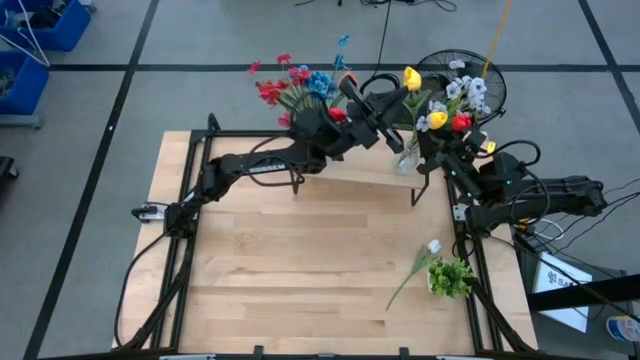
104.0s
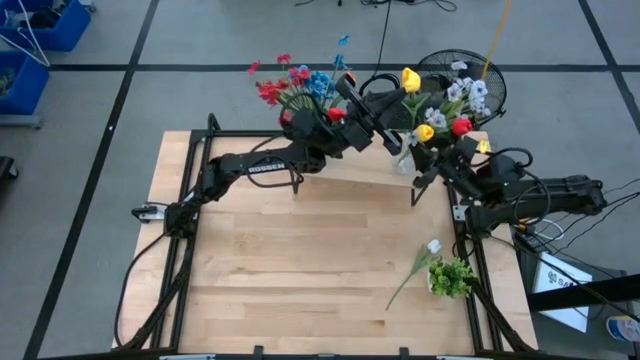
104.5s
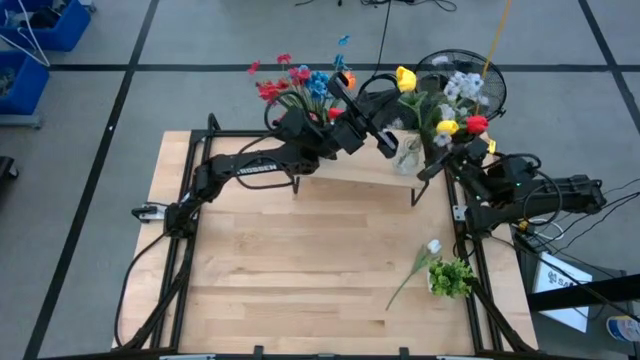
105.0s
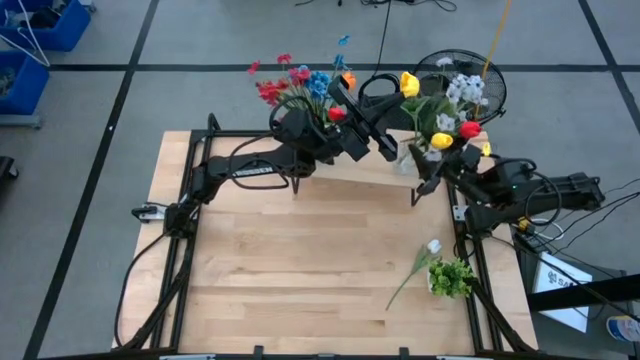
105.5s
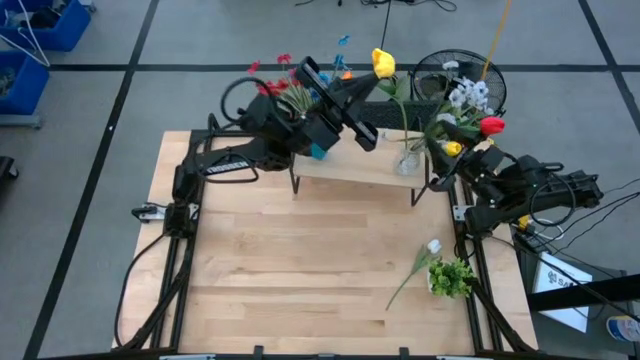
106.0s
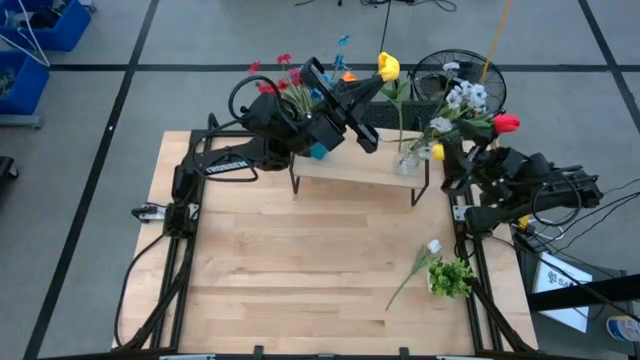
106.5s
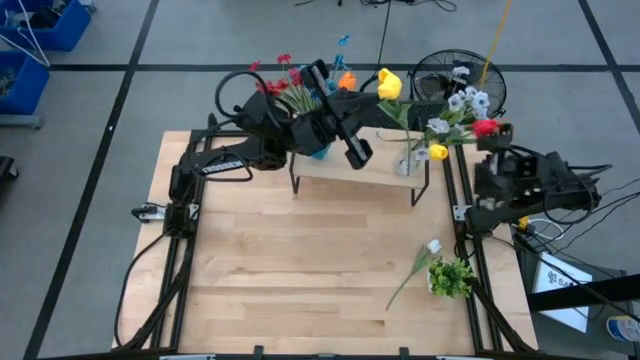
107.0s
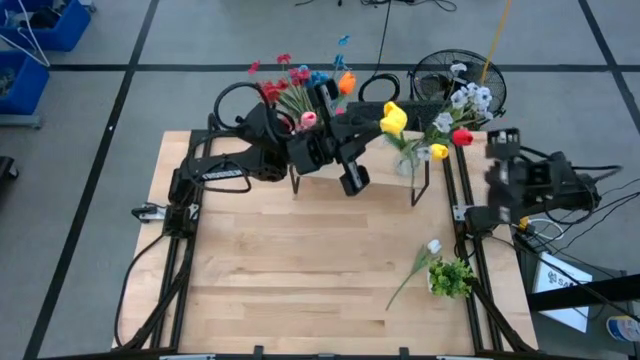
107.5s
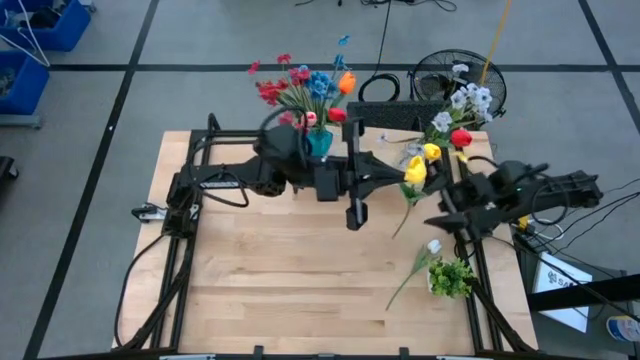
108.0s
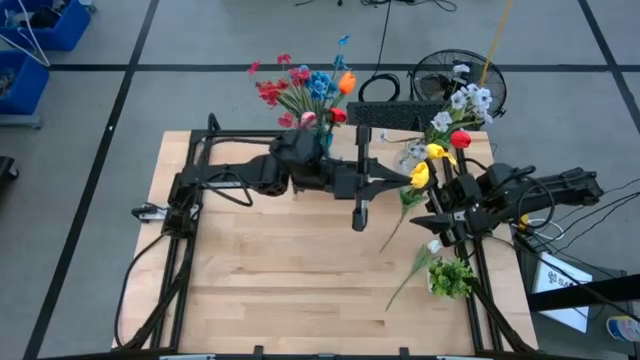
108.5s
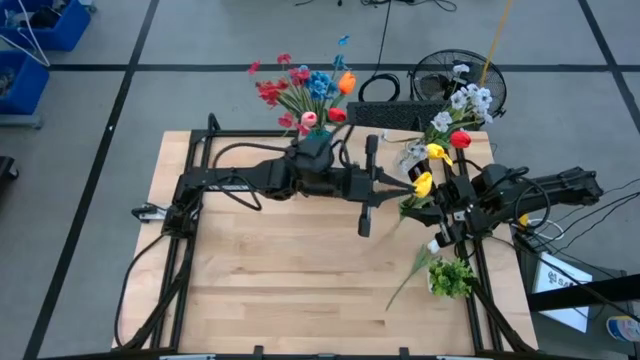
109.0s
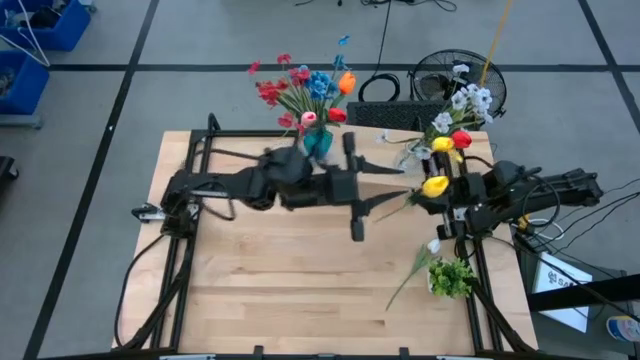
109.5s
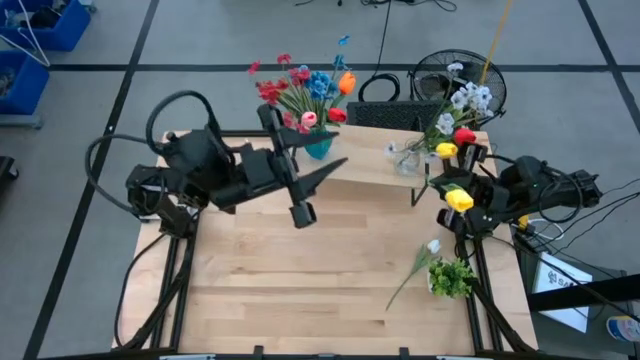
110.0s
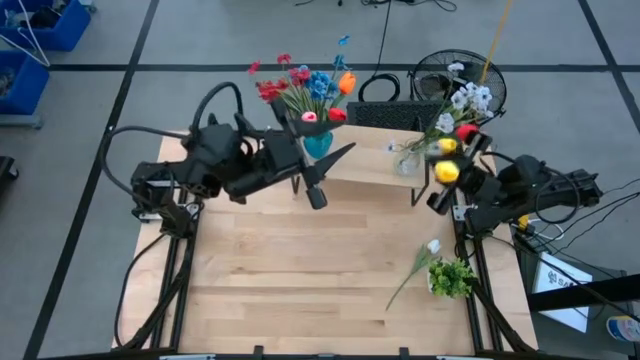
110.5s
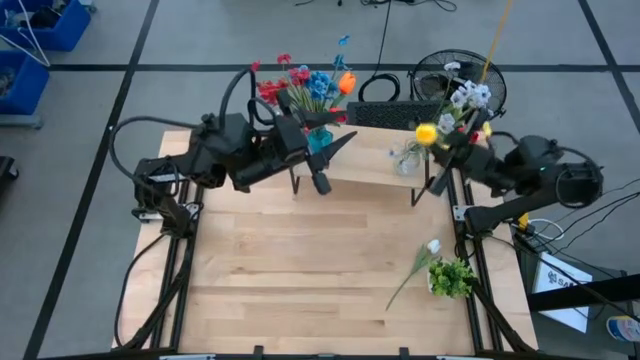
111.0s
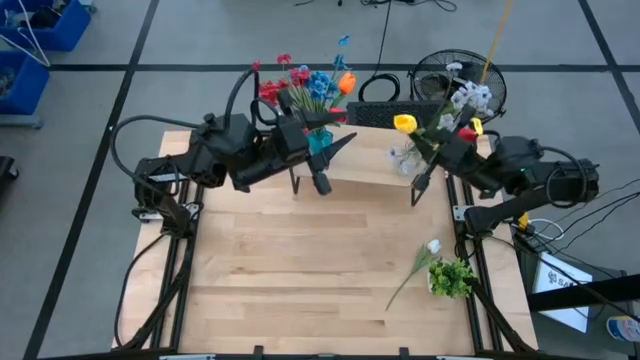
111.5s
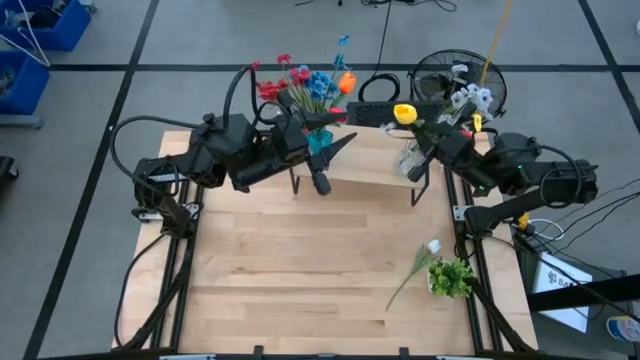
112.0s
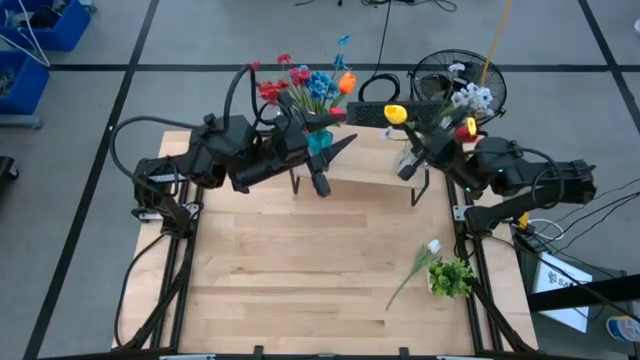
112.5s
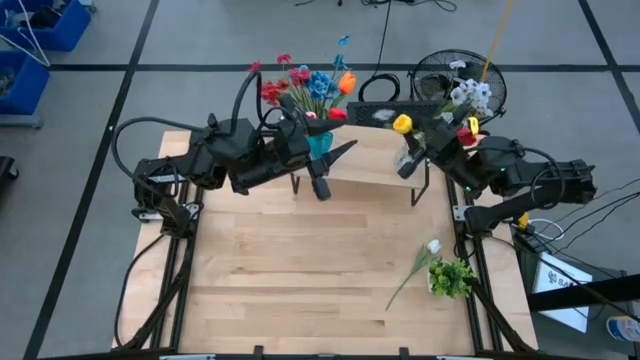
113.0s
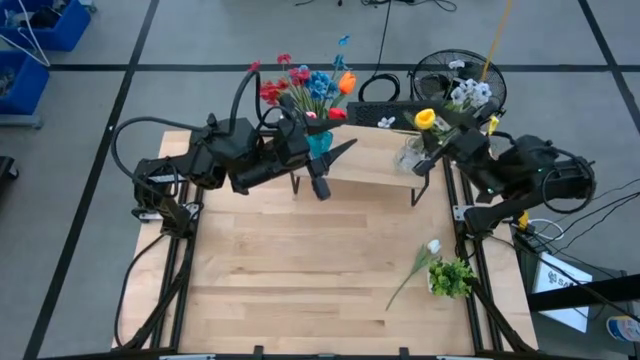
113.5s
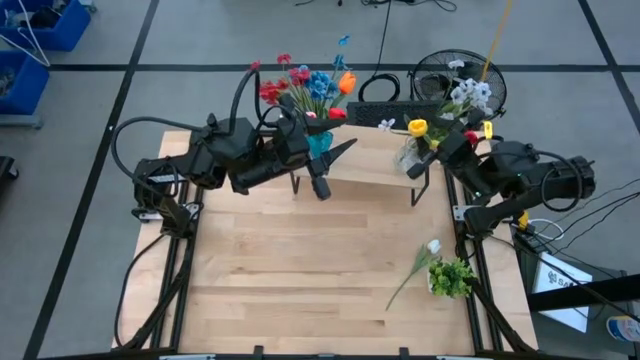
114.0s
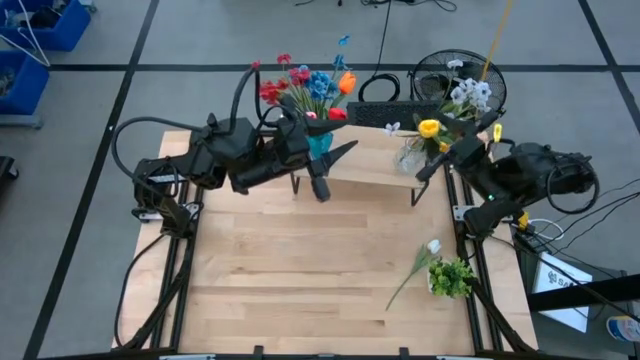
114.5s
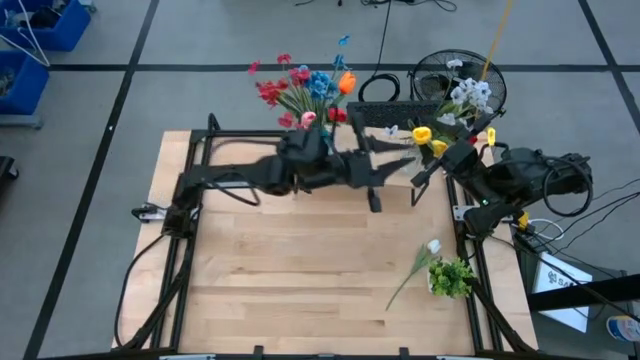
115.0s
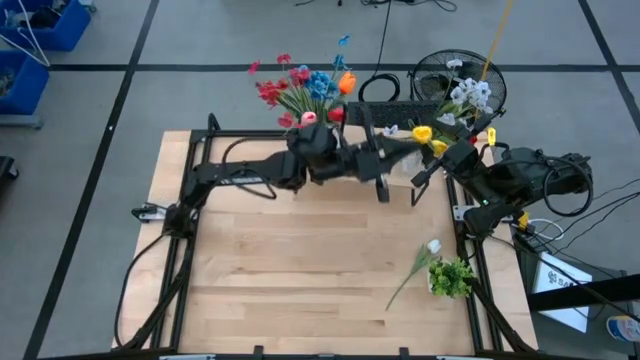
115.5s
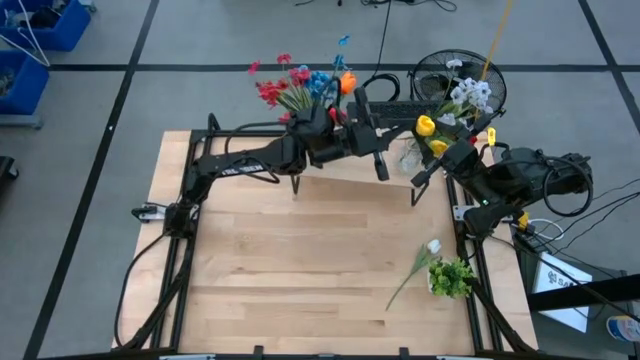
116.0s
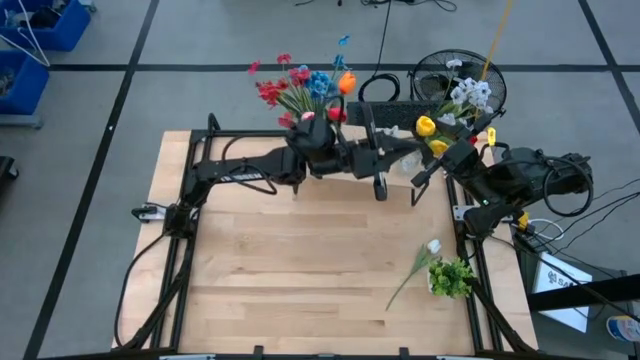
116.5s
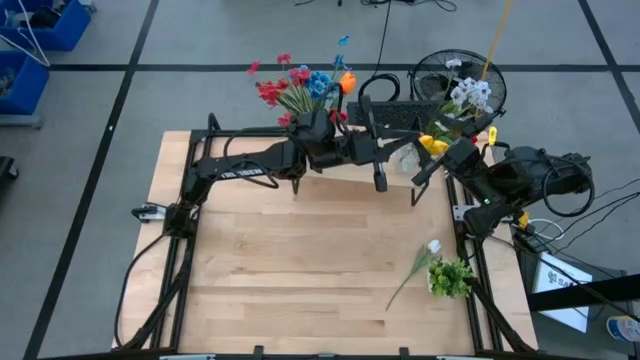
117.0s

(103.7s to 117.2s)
Task: Pick and place flowers into a vace then onto a shelf
Put the yellow tulip into the transparent vase

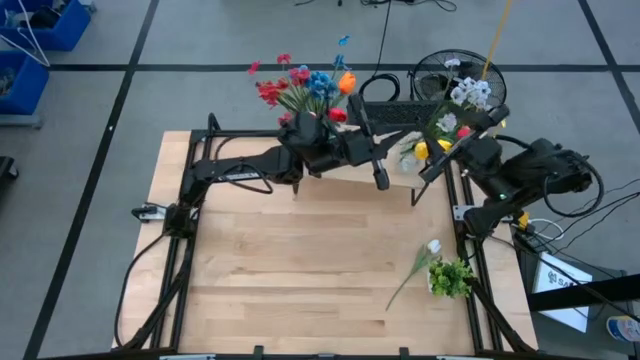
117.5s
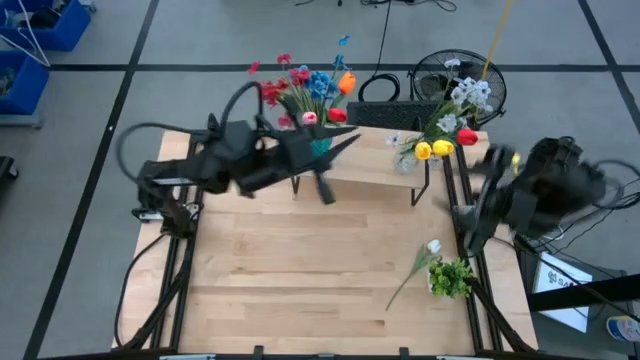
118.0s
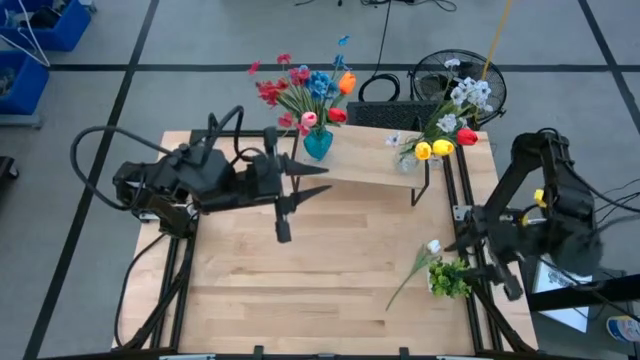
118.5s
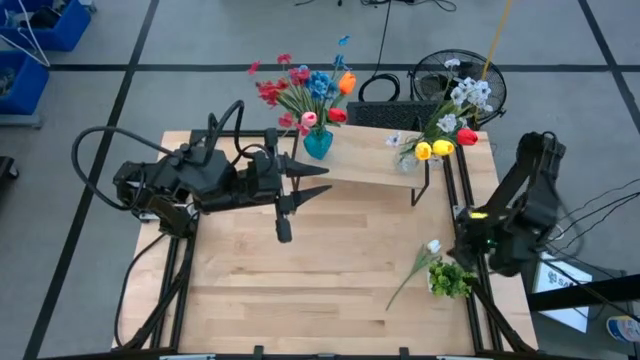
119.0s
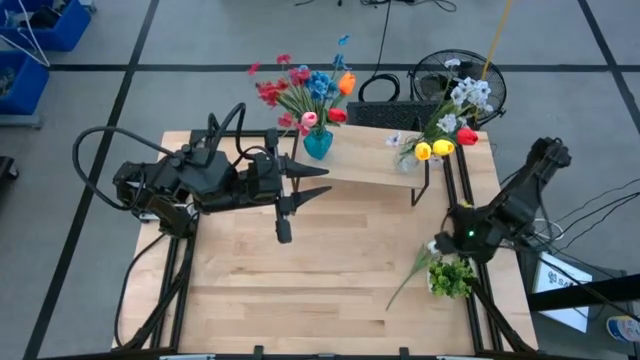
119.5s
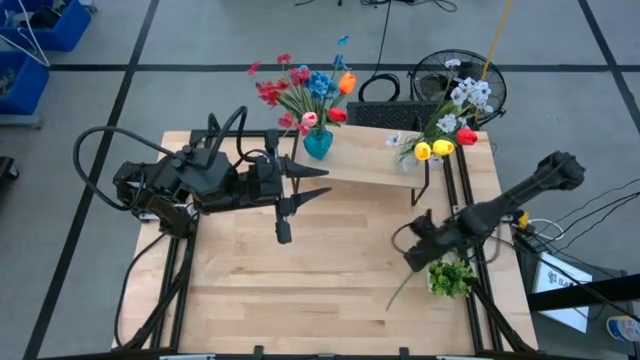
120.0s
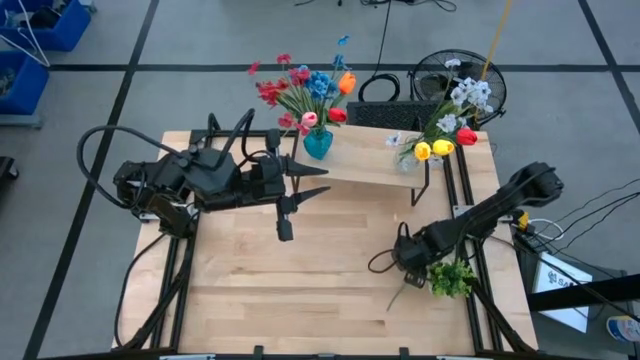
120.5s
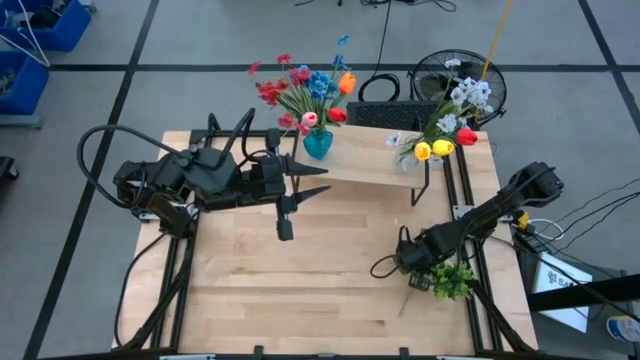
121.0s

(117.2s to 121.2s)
Put the white tulip into the transparent vase

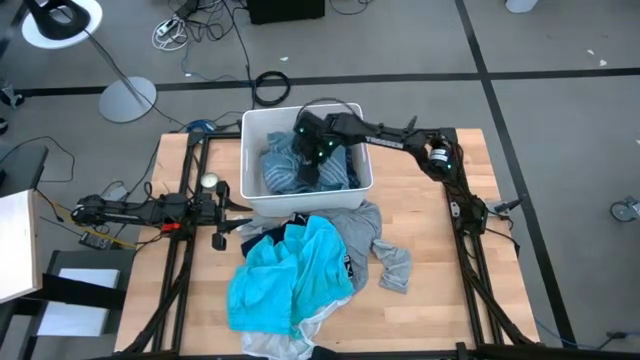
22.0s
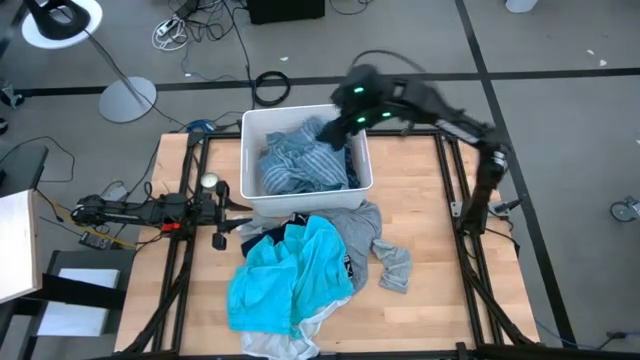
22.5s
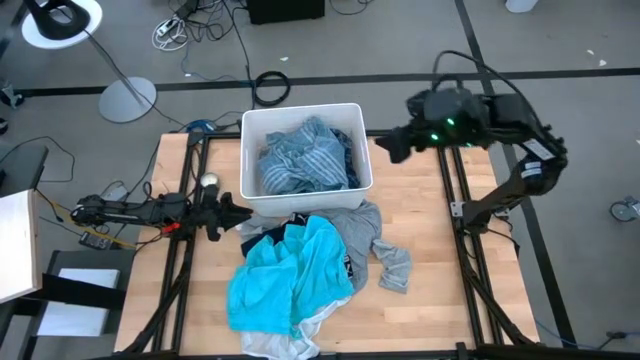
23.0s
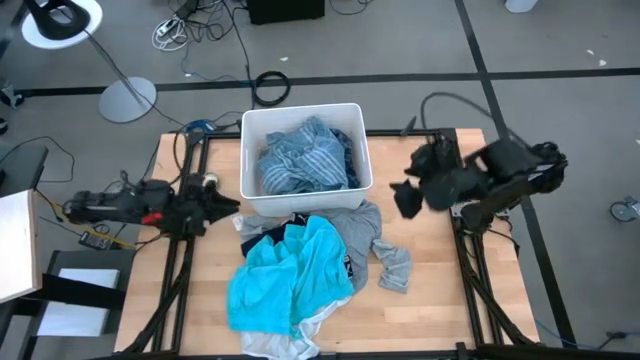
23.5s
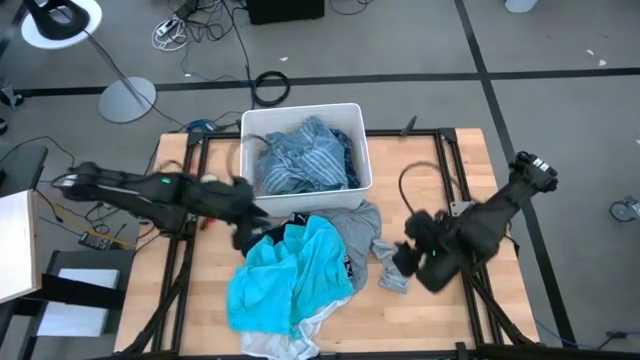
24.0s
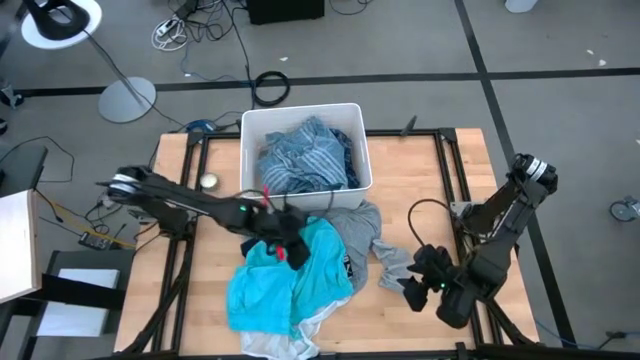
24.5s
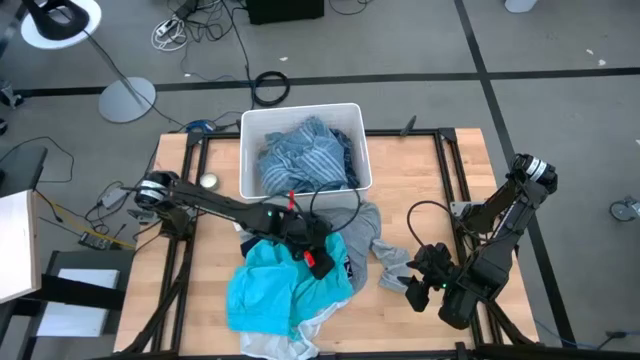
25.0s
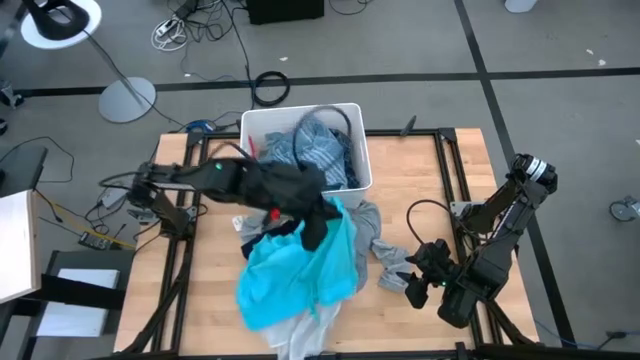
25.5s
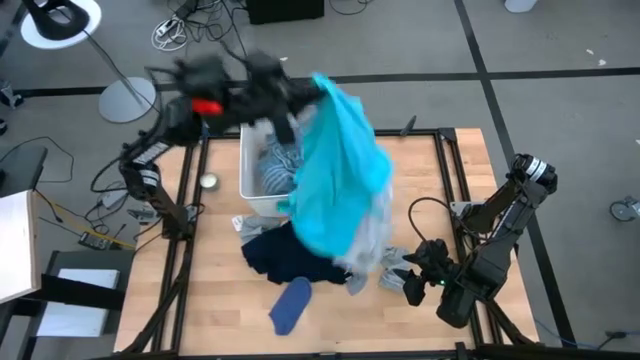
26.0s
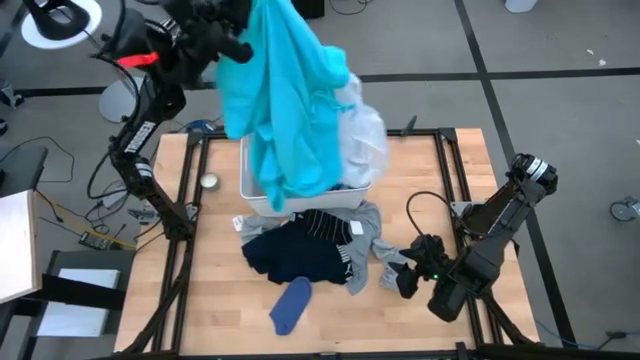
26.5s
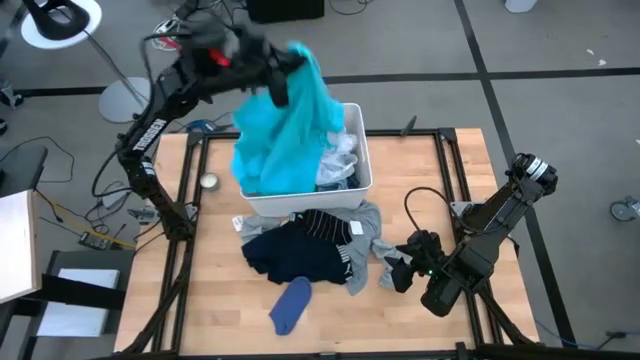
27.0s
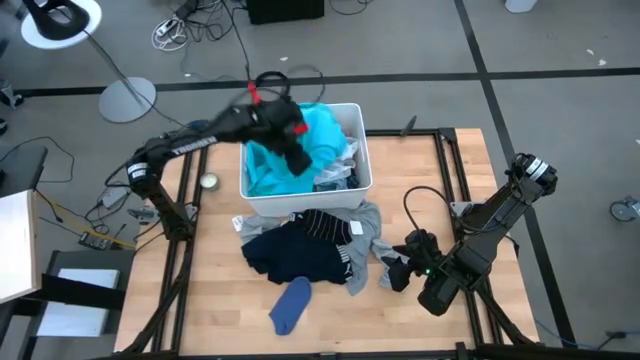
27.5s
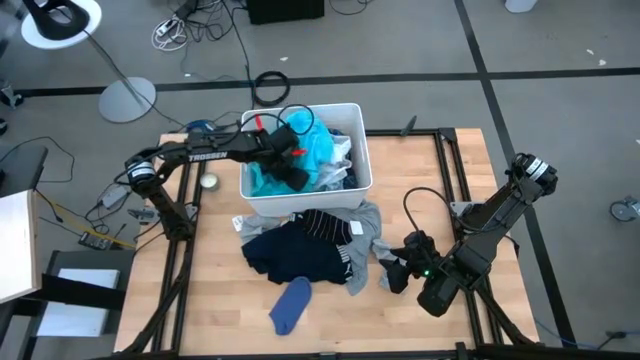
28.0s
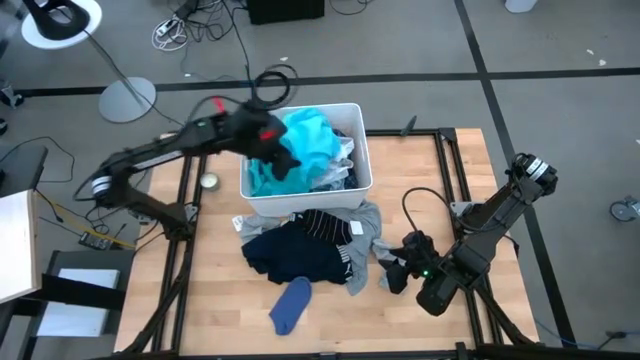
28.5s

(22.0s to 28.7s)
Task: Sort clothes
Put the blue shorts into the white bin
